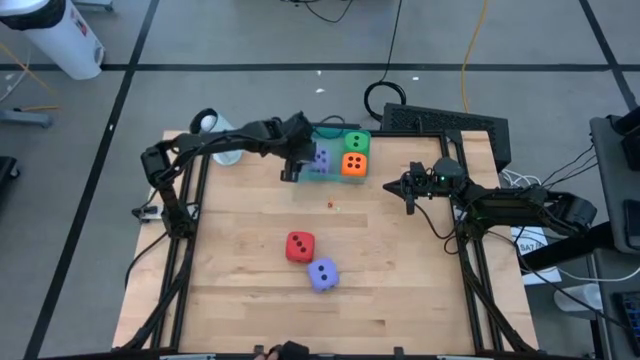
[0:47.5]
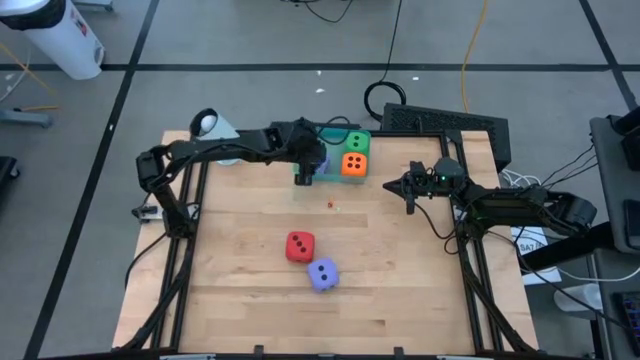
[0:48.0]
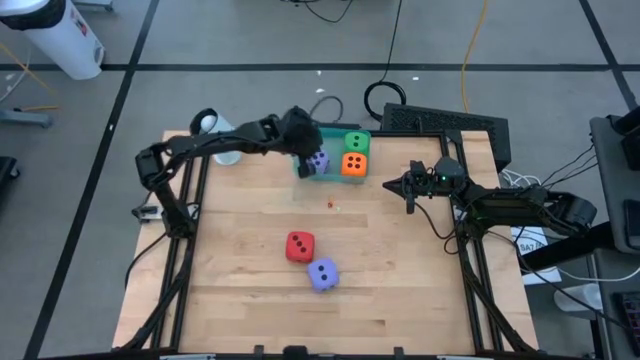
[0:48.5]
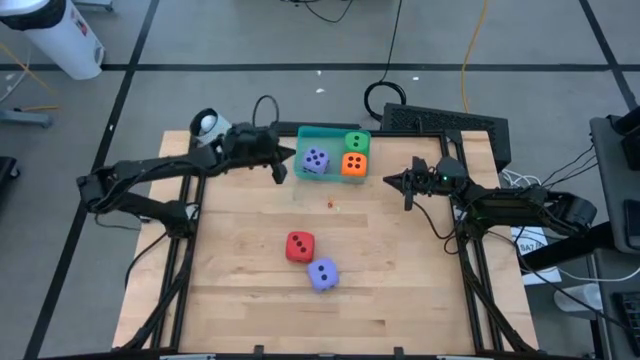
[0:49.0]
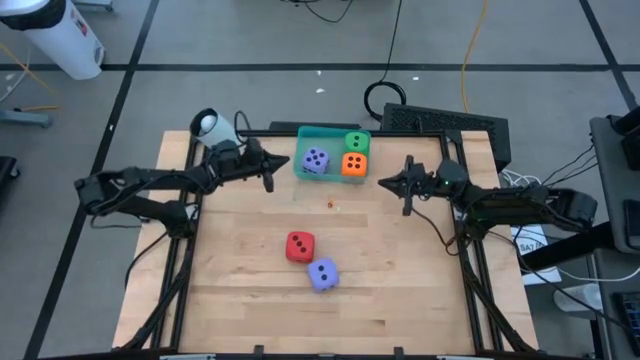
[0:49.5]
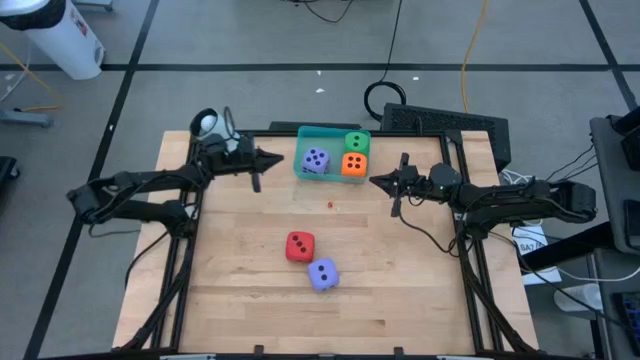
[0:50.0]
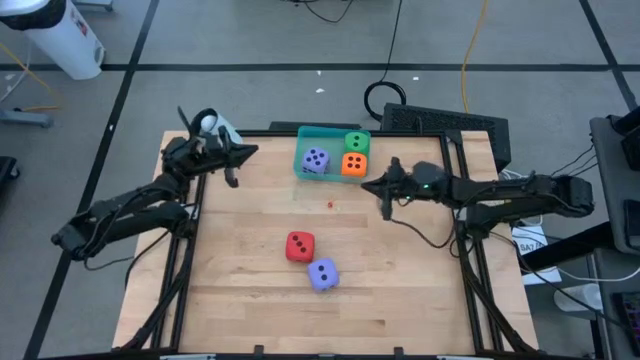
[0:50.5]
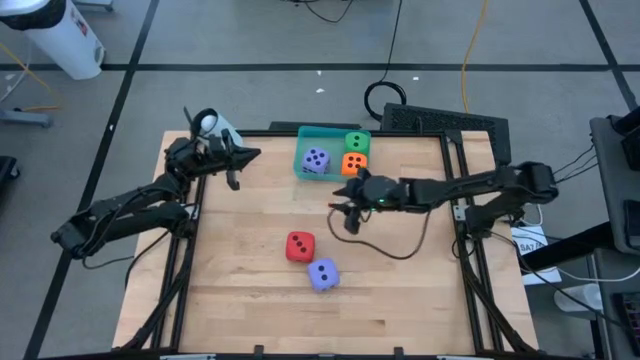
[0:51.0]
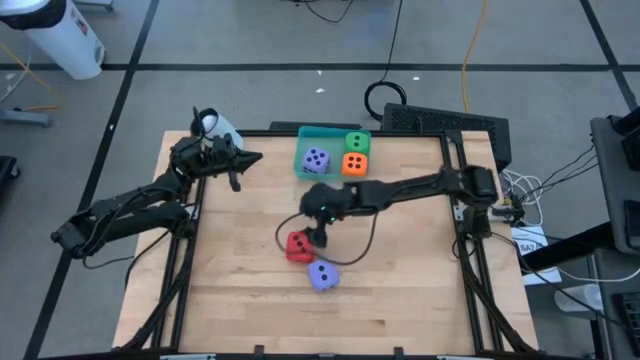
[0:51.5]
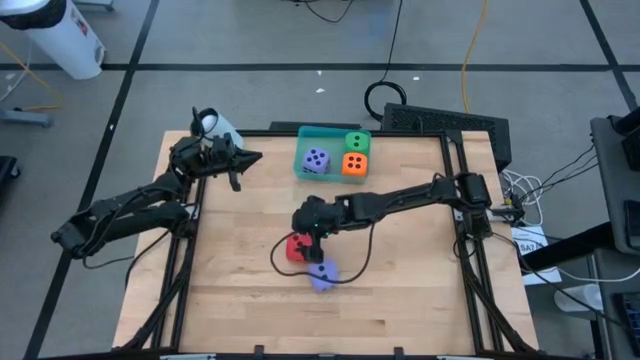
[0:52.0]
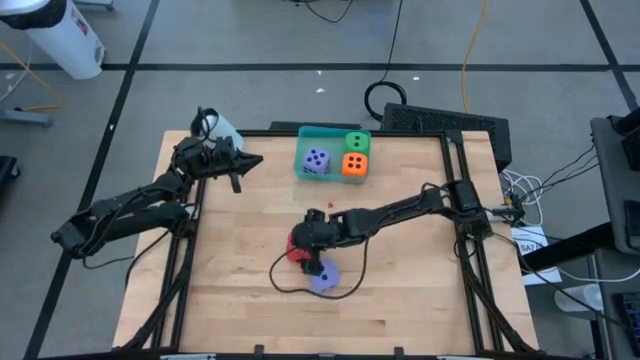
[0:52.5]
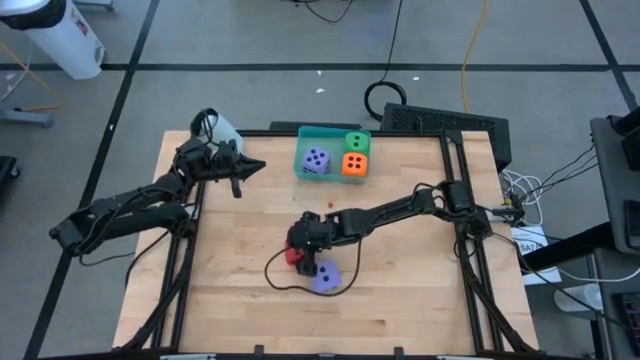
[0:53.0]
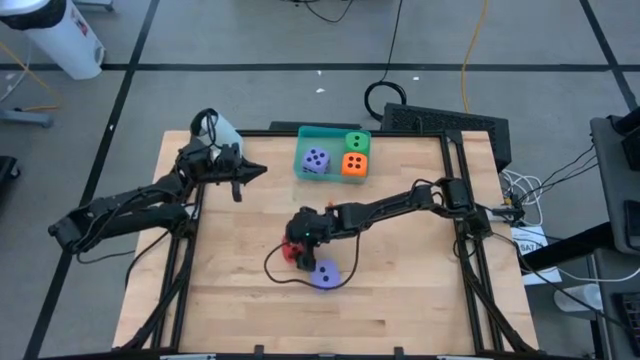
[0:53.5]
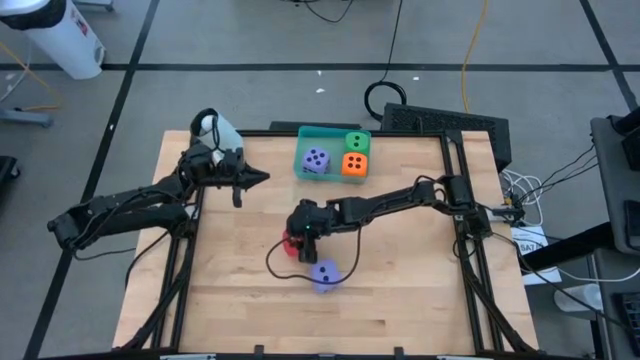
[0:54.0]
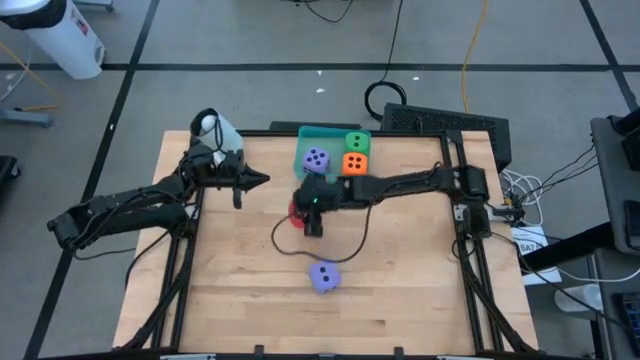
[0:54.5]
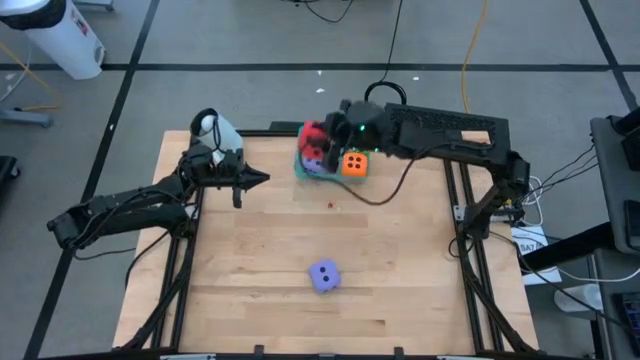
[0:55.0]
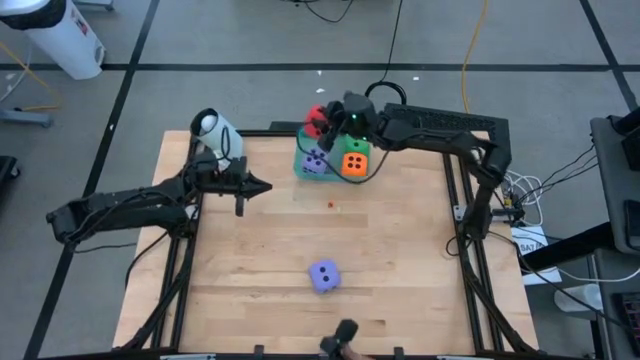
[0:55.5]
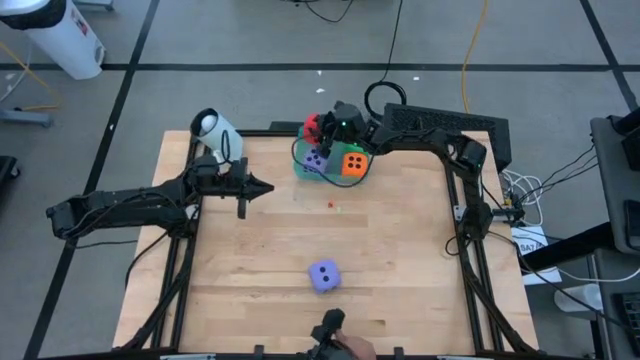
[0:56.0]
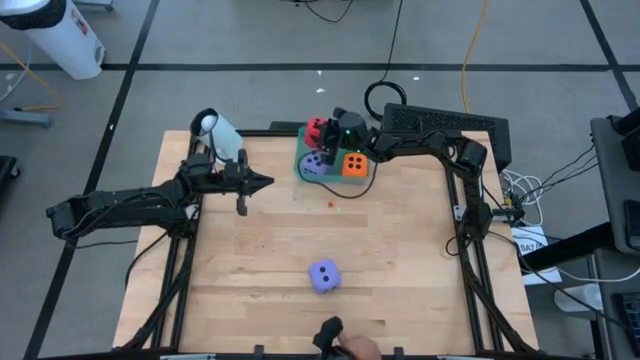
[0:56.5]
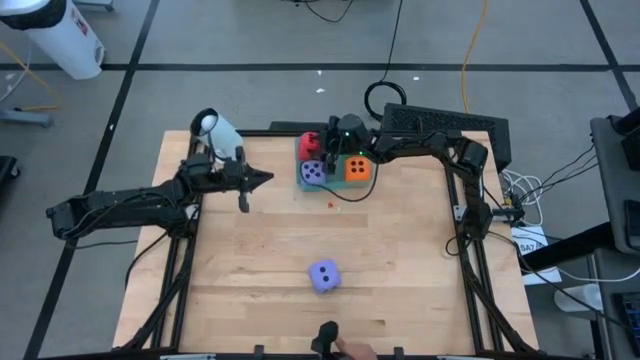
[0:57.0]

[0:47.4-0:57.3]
Task: Pick & Place Dice
Put the large red die into the blue bin

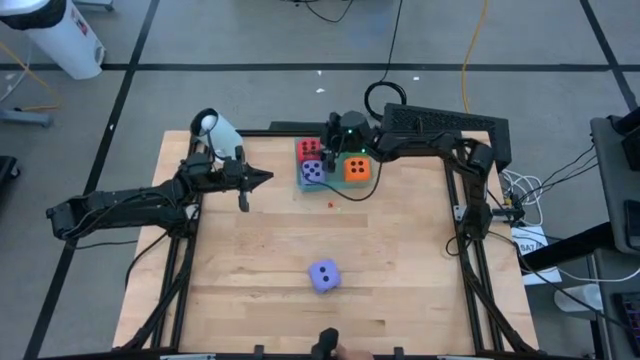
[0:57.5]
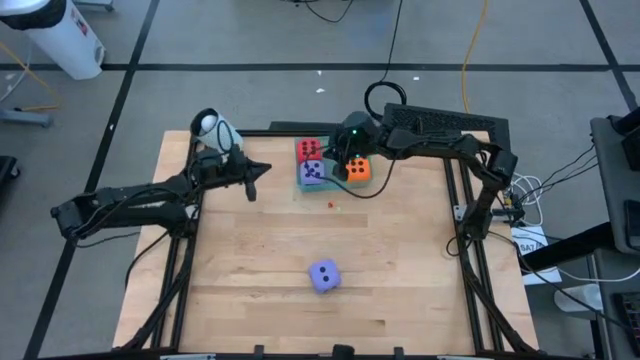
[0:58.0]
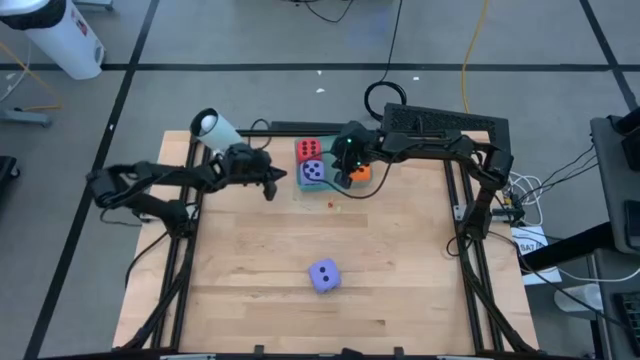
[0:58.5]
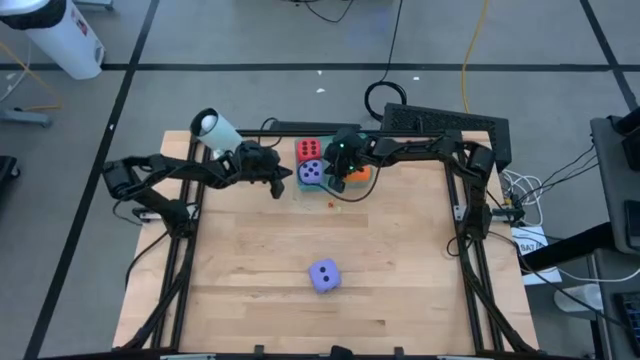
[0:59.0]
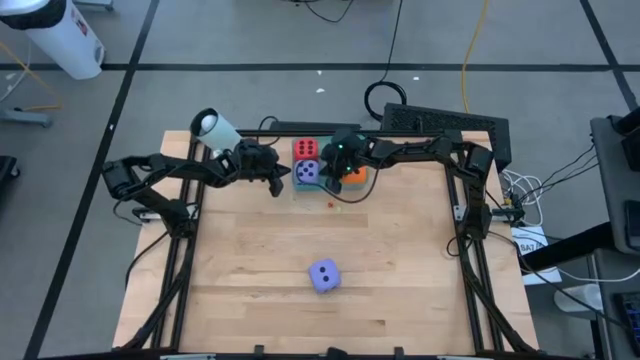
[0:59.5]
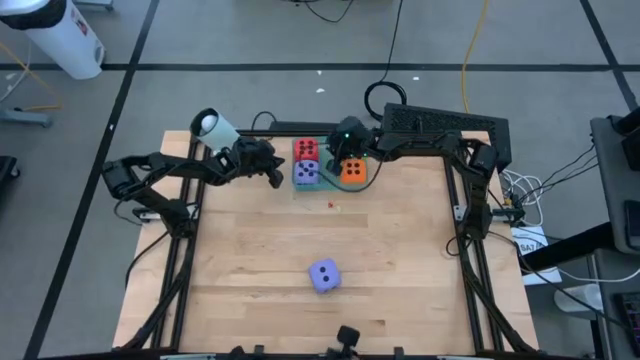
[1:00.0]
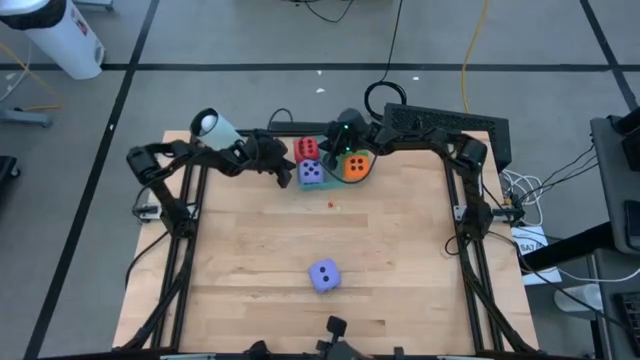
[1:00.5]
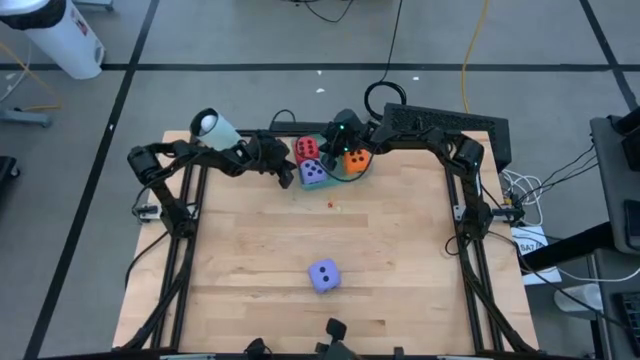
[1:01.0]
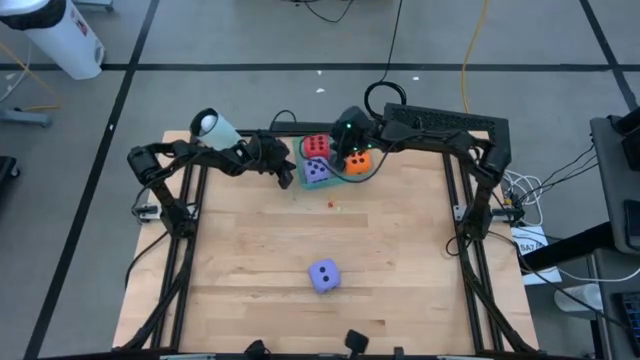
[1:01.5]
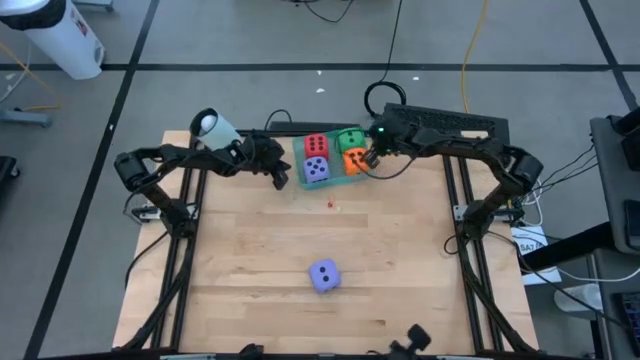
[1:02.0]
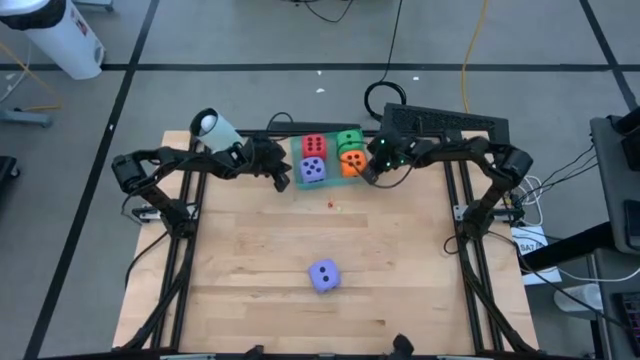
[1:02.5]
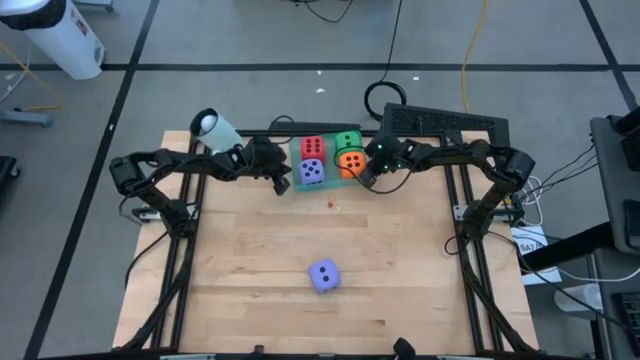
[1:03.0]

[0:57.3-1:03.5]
Adjust the large dice in the blue bin
